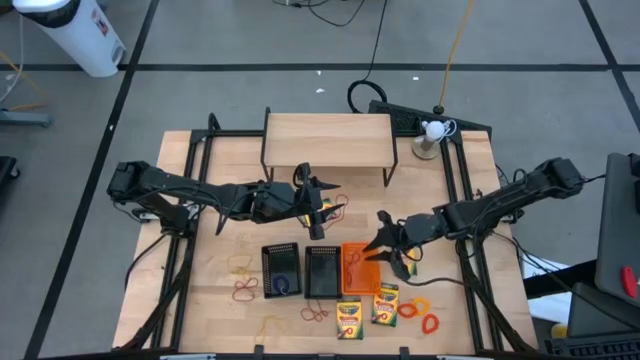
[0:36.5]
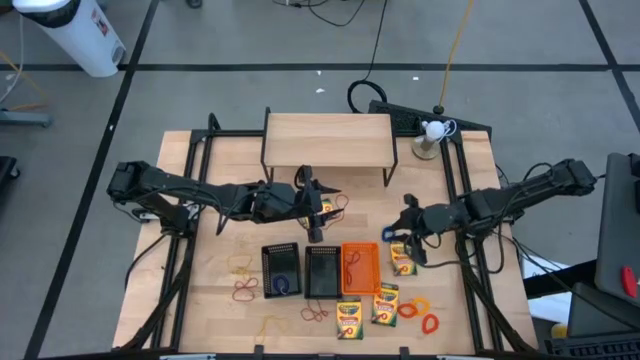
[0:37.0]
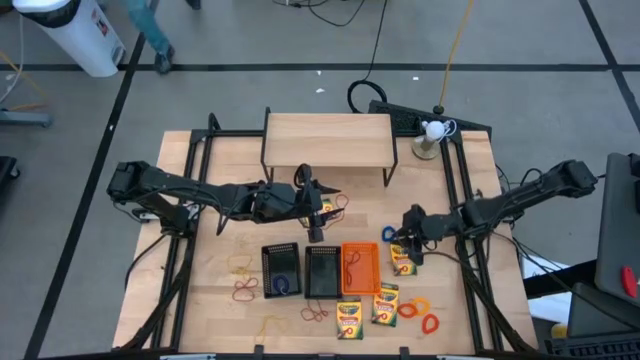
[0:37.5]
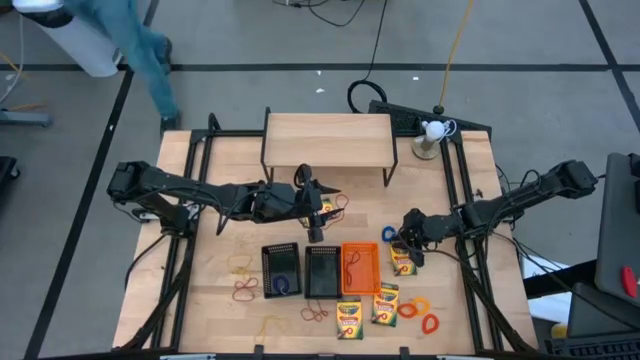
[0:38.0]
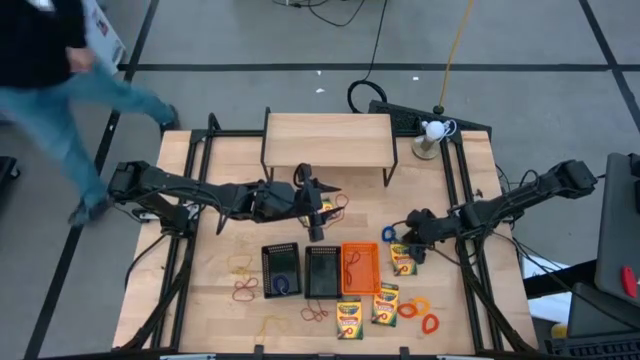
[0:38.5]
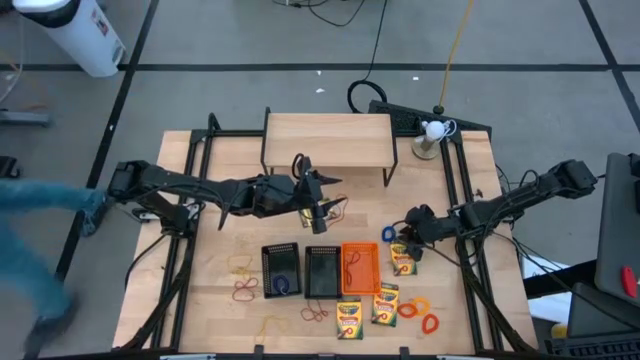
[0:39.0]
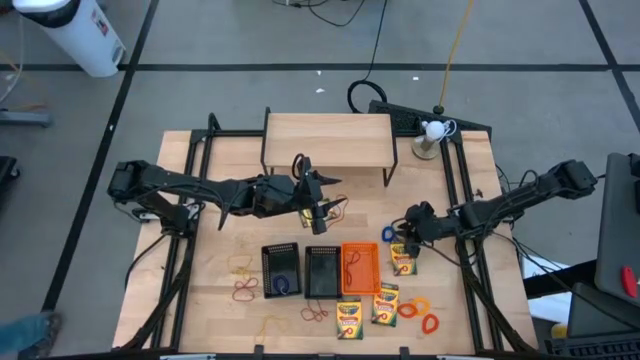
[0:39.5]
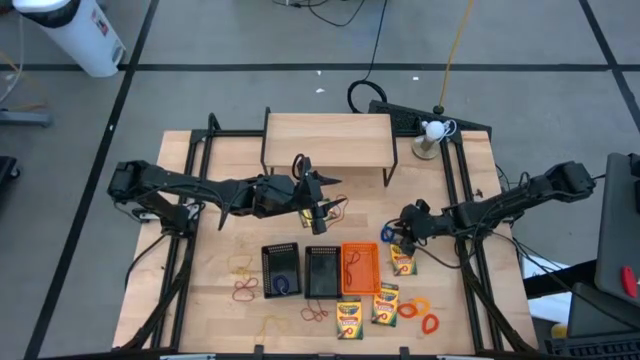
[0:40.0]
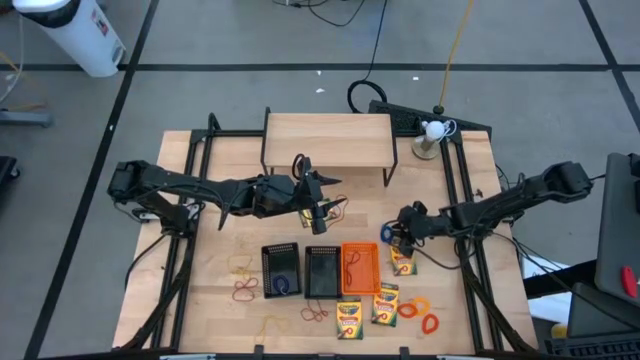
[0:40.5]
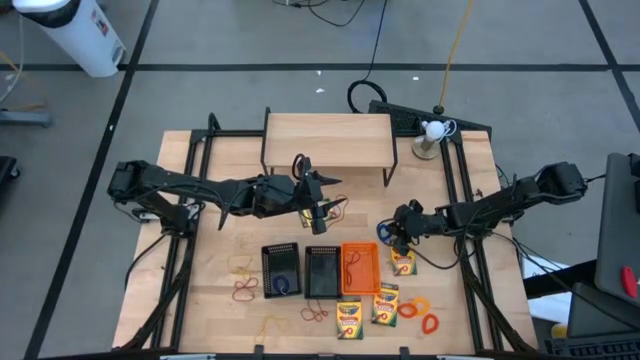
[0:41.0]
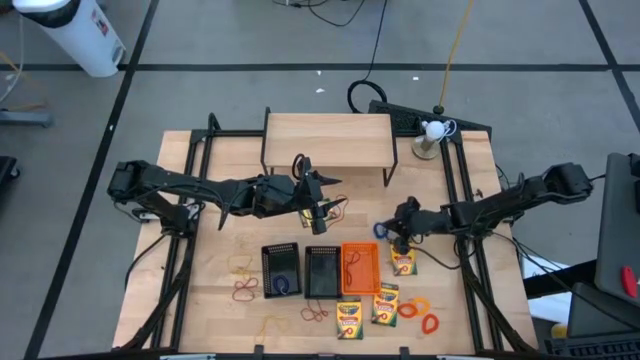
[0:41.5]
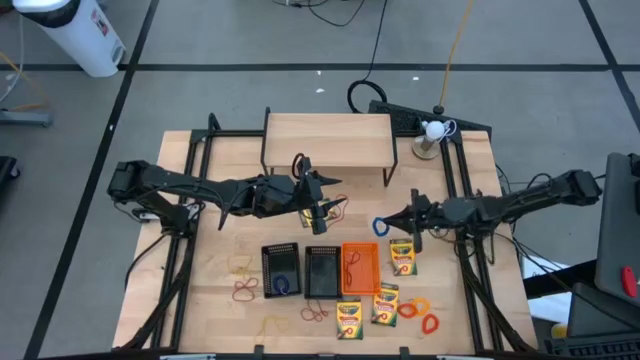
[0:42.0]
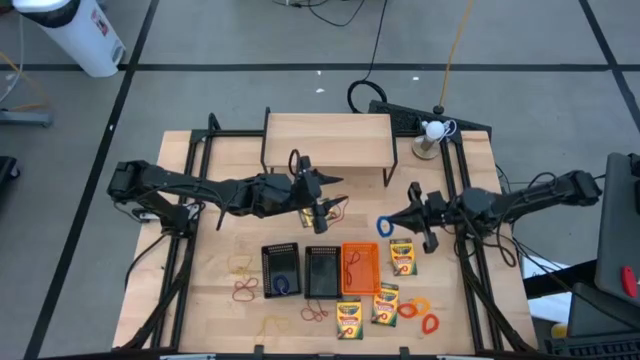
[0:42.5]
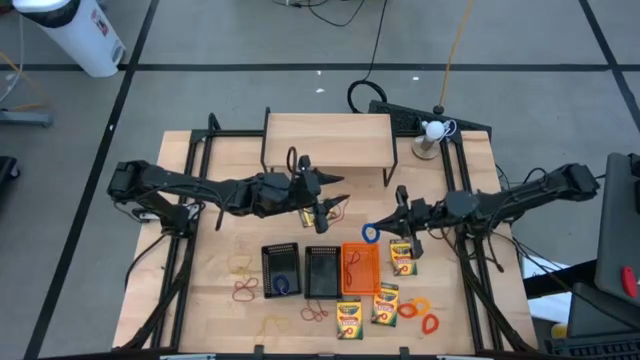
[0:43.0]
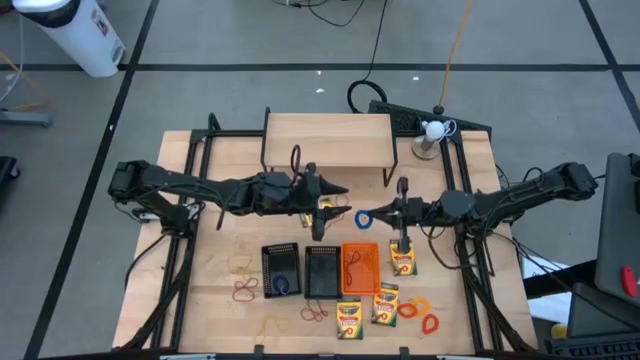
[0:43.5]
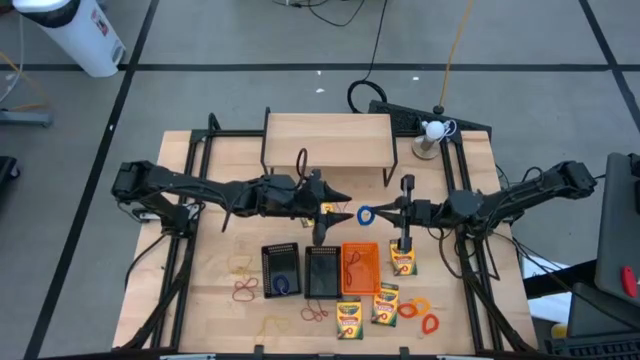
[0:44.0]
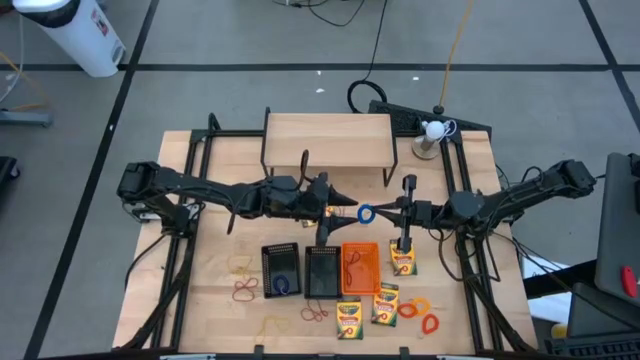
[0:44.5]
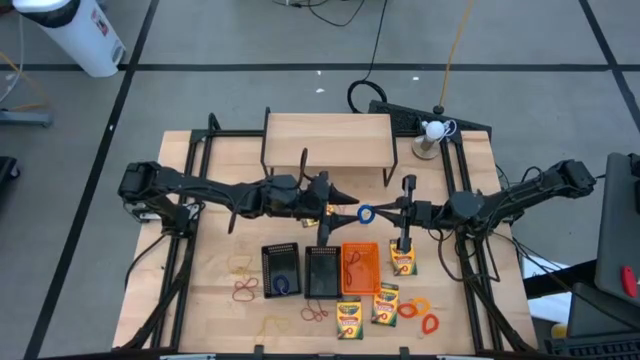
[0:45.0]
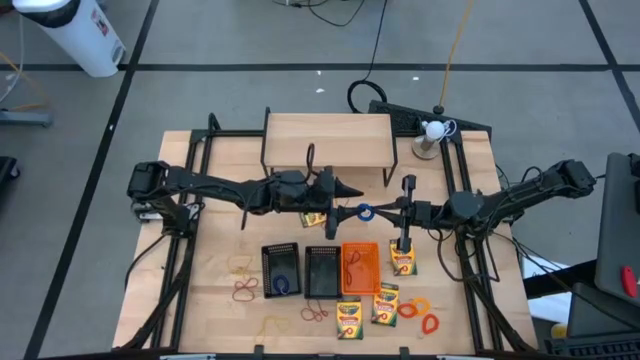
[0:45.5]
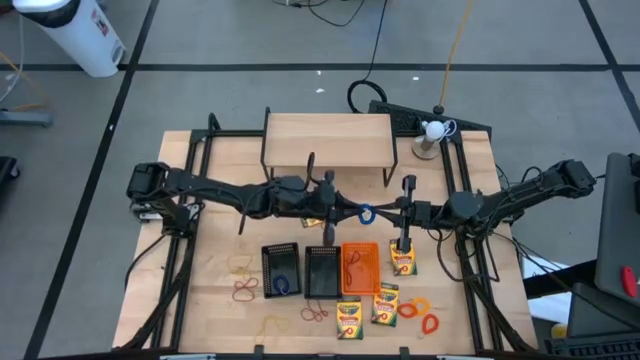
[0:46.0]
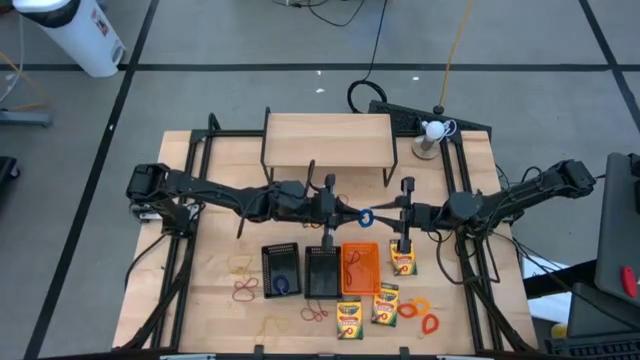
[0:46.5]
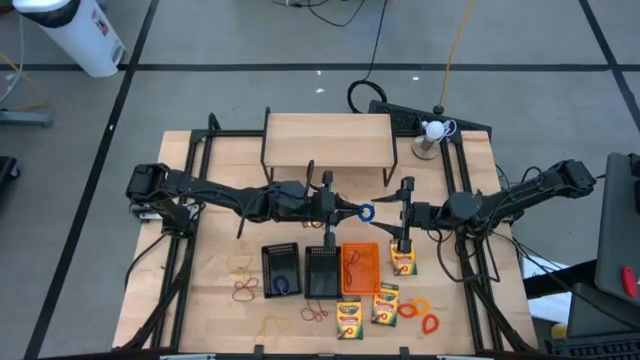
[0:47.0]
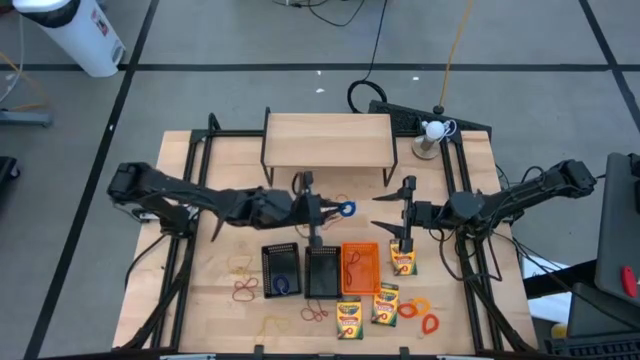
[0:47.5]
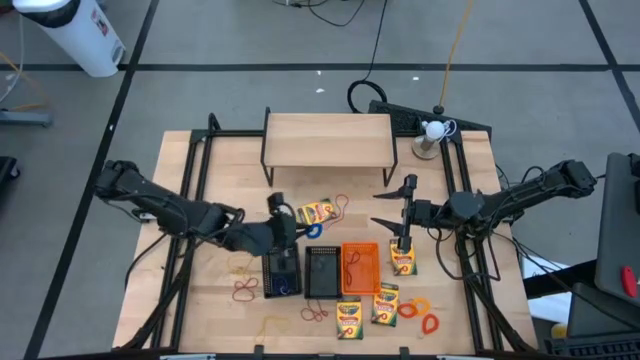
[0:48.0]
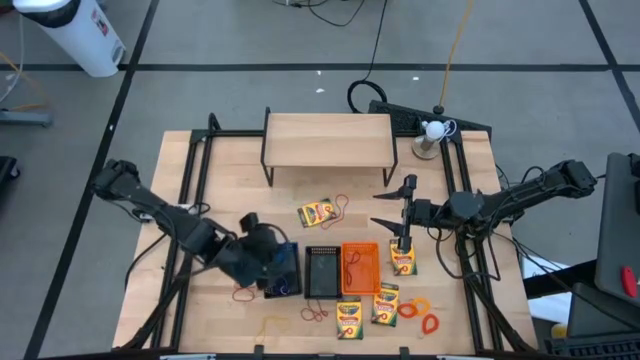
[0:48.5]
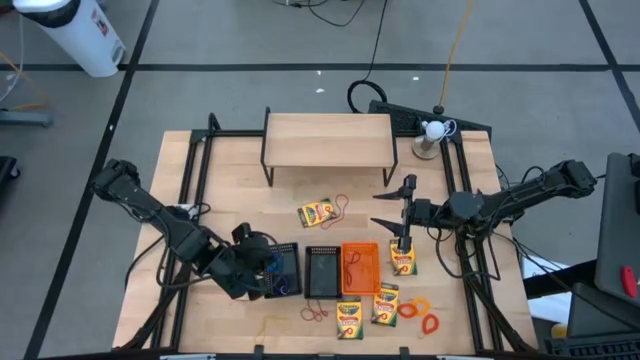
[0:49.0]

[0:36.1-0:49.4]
Task: Pick & Place Office Desk Supplies
Put the blue spring keychain into the left black bin

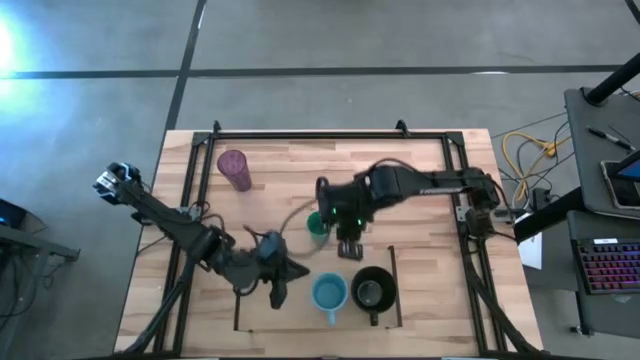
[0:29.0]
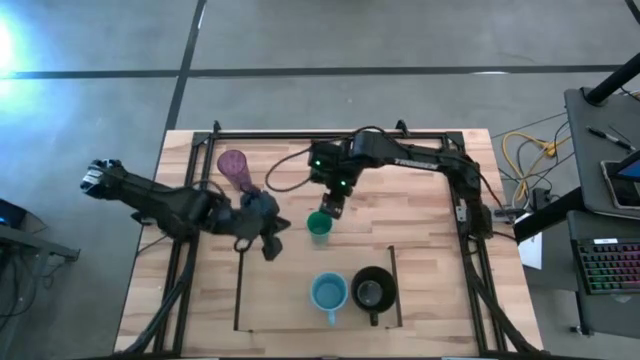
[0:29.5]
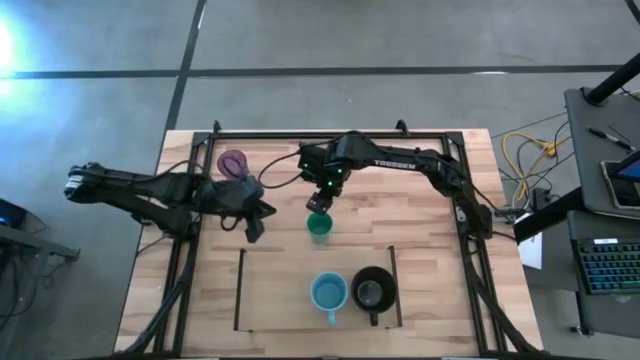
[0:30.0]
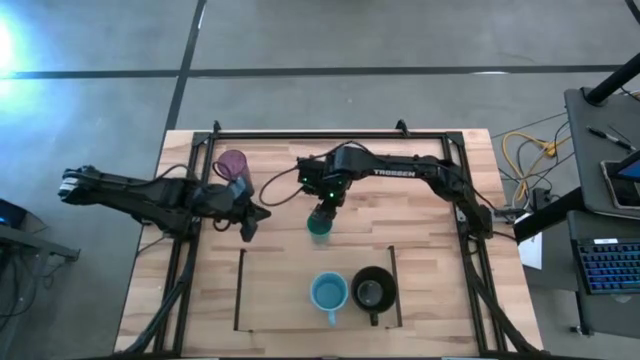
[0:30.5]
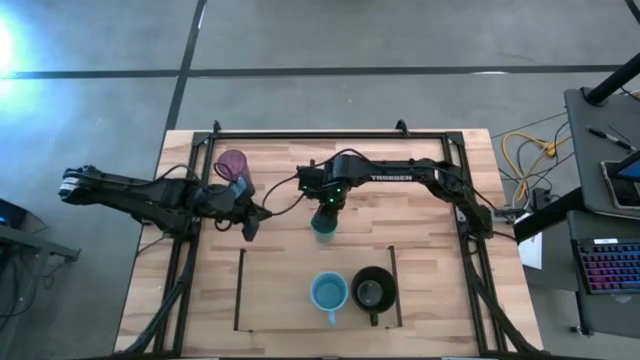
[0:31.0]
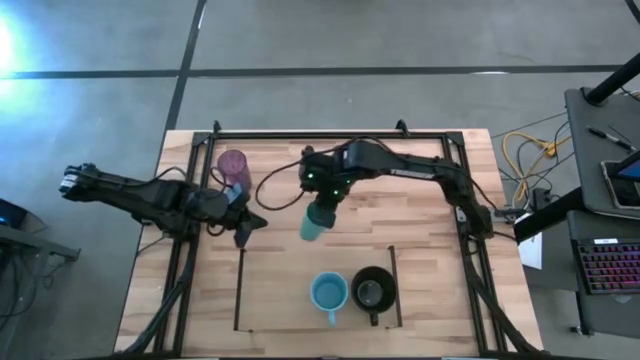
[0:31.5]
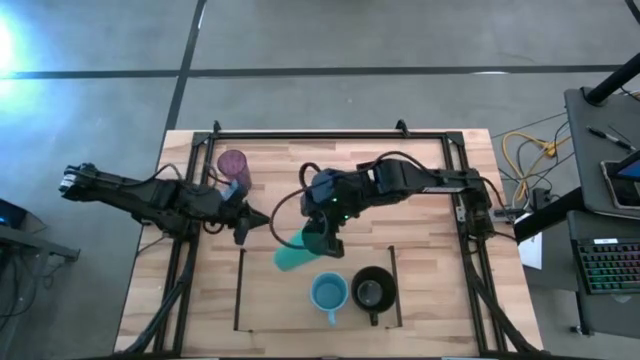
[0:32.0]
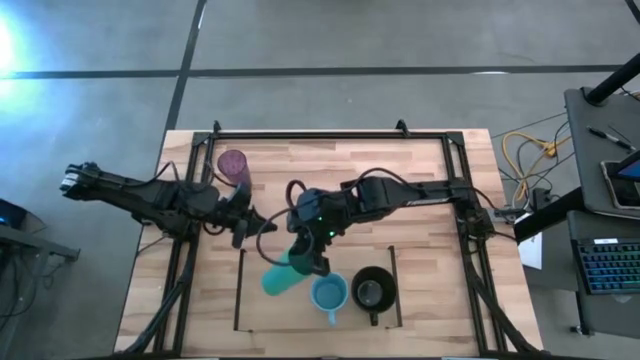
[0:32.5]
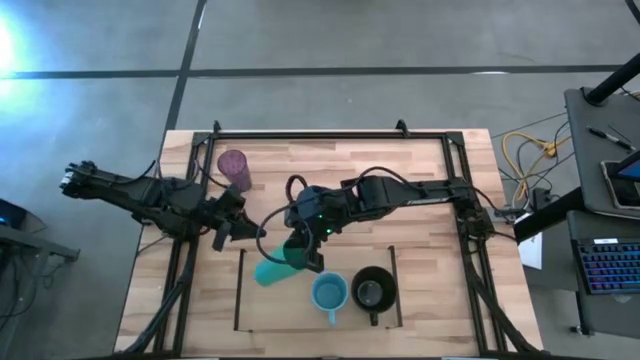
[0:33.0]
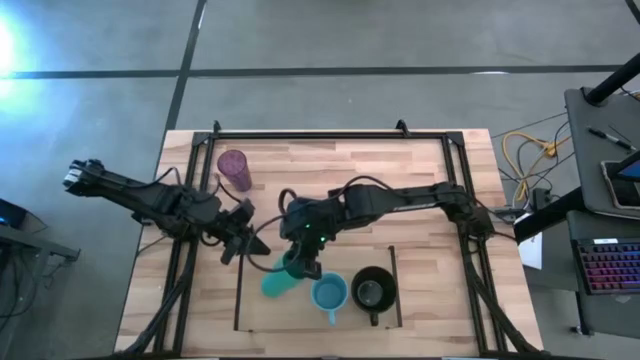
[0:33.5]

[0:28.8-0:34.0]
Task: Stack small to large cups/mugs on shelf
Put the blue cup on the shelf
